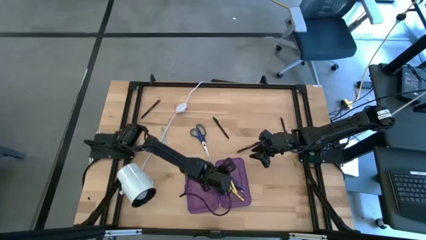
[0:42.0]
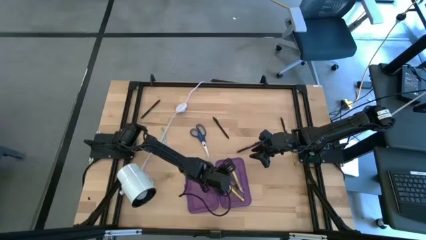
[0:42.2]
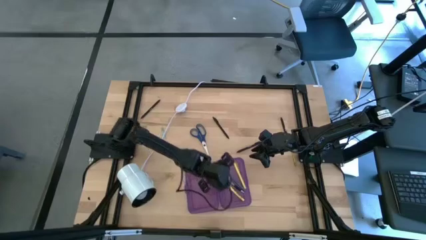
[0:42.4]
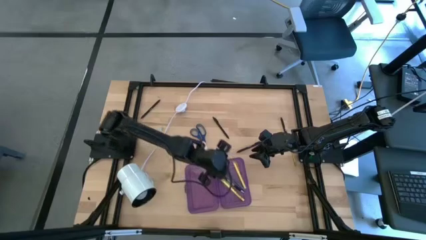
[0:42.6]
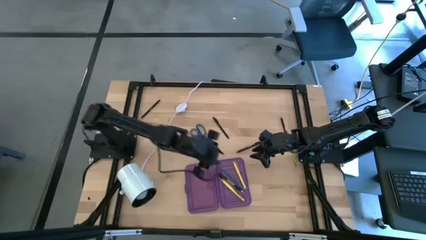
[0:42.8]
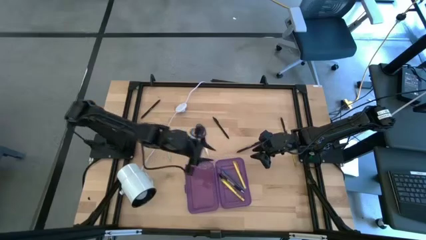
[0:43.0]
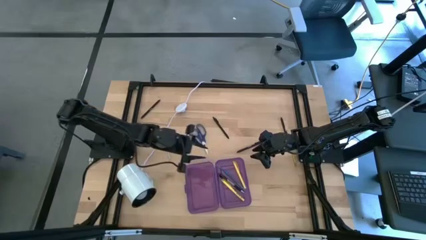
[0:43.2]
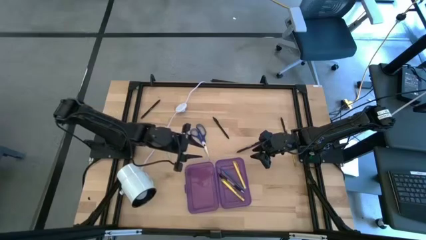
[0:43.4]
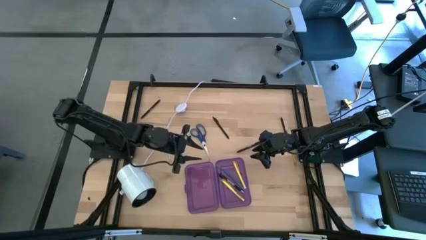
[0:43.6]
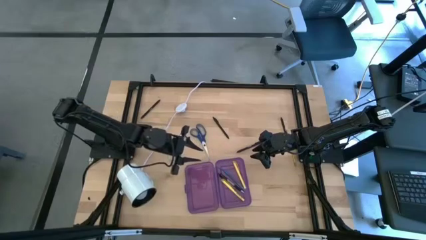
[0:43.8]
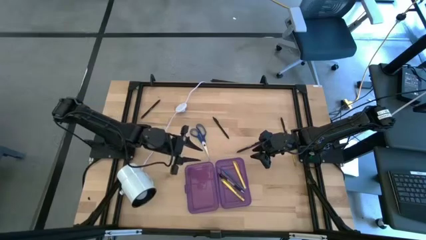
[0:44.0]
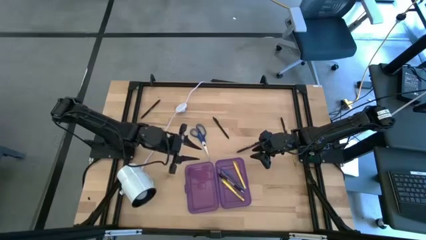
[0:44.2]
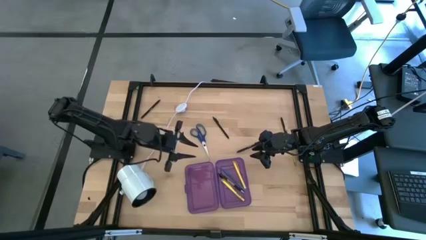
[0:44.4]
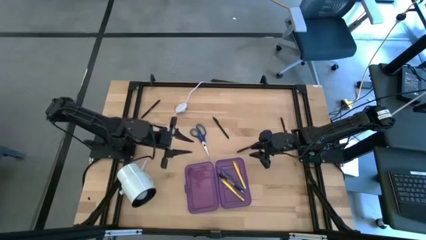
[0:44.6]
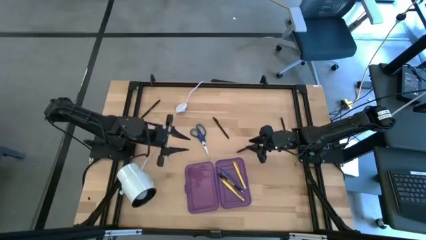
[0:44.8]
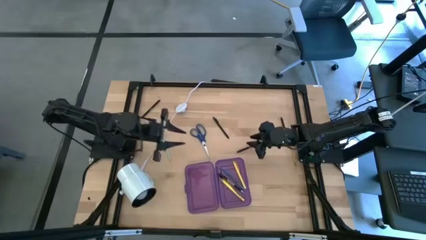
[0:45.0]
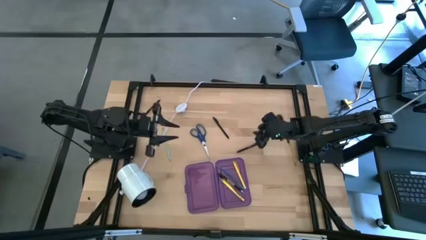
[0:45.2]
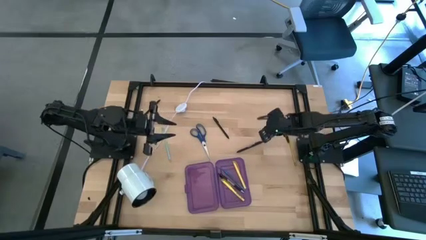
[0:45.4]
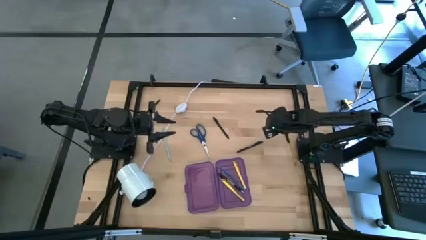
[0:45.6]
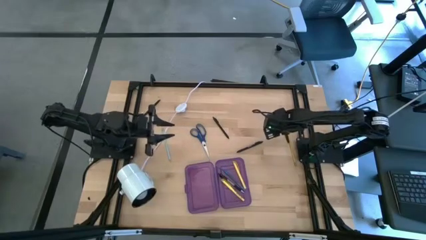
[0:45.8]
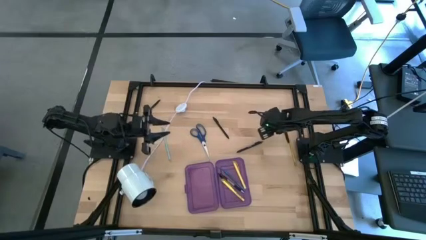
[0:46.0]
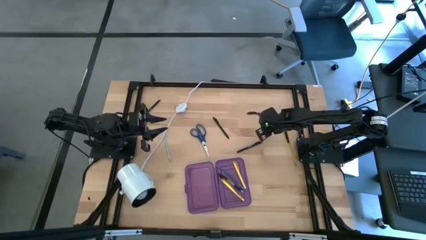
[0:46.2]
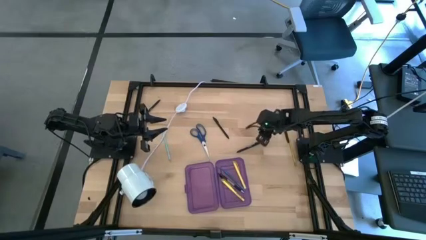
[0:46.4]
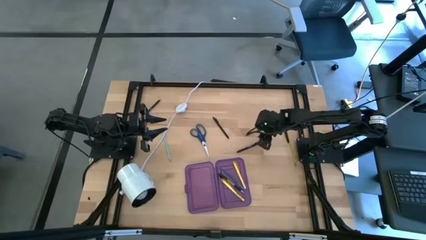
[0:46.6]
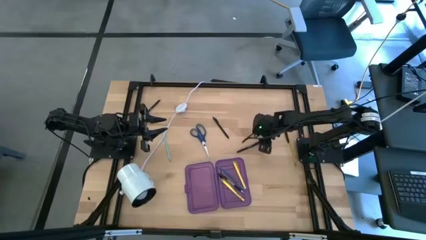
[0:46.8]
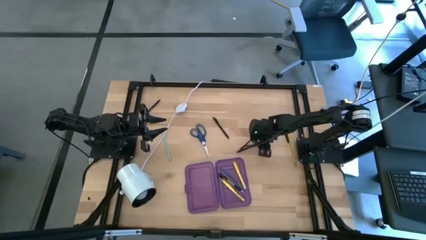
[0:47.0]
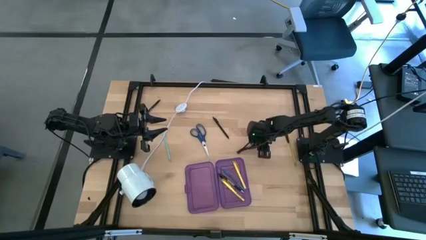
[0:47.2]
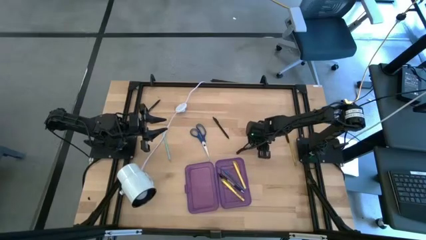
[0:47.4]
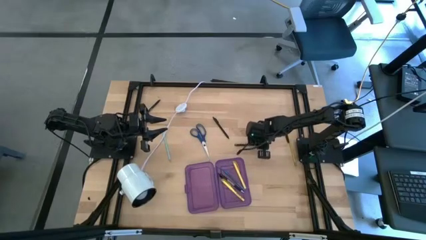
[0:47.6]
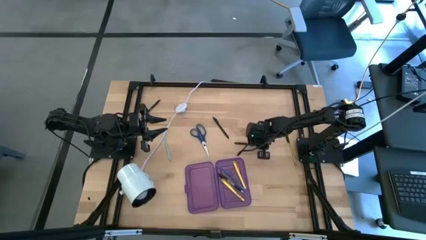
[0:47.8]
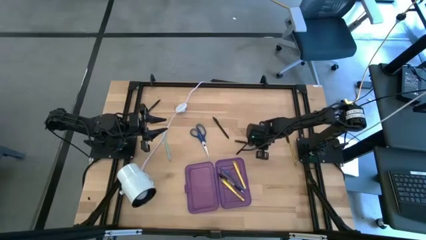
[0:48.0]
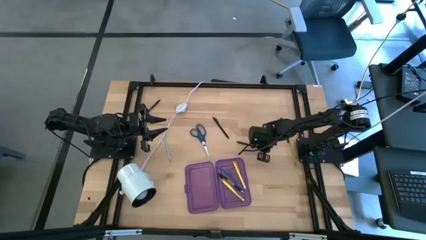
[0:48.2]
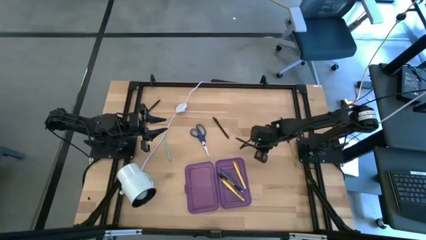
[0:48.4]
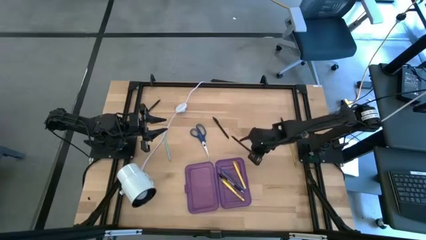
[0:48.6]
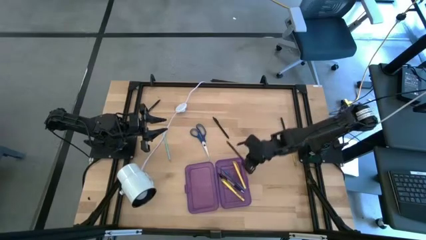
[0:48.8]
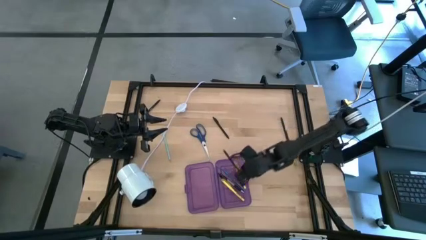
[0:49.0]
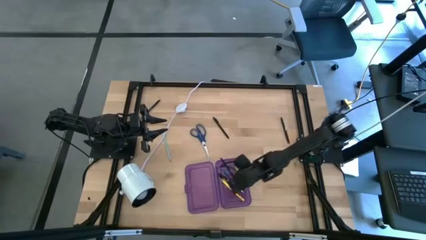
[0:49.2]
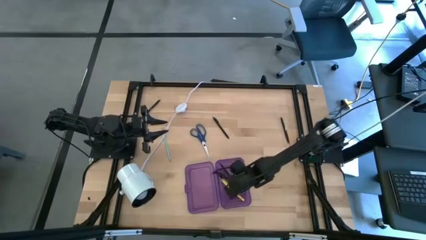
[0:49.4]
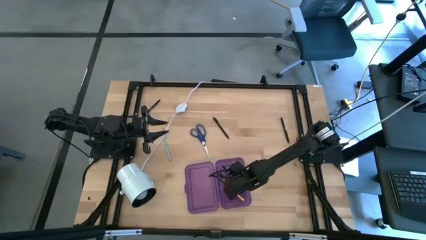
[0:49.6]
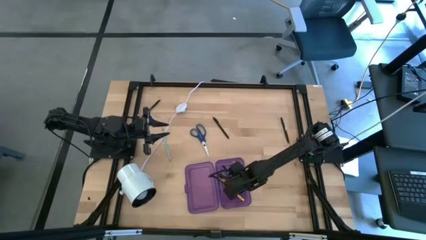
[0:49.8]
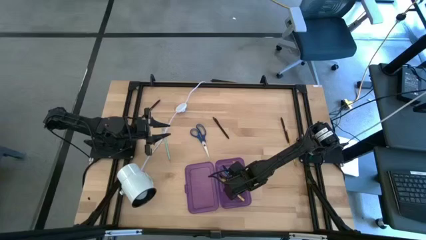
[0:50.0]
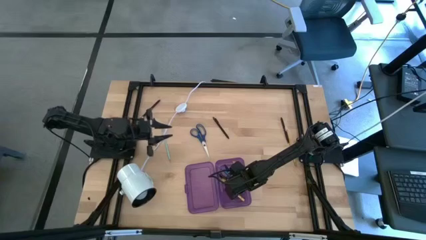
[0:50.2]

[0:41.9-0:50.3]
Task: Pick & place school supplies into a supply box
Put the black pen into the purple supply box

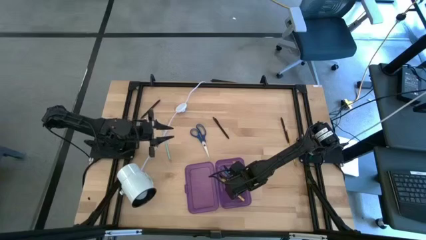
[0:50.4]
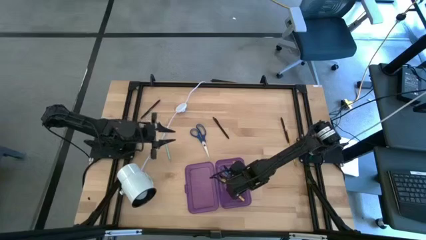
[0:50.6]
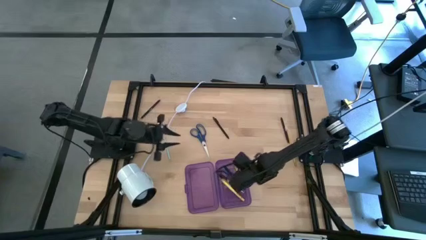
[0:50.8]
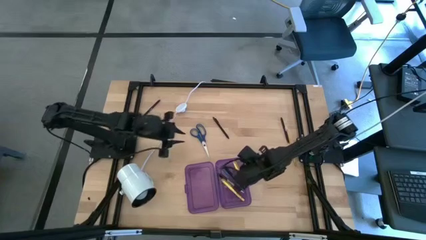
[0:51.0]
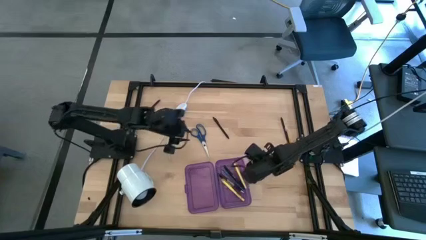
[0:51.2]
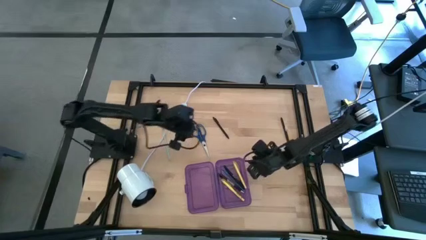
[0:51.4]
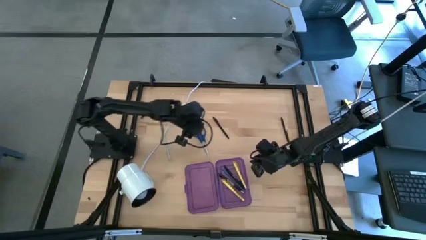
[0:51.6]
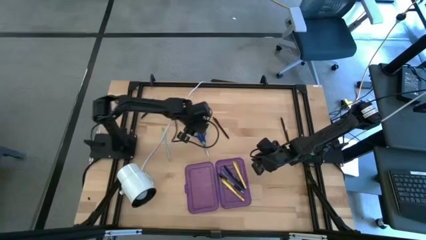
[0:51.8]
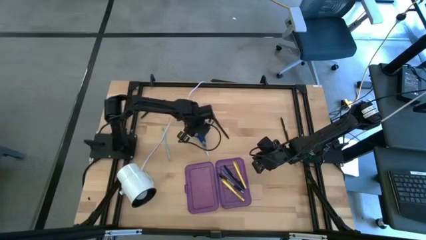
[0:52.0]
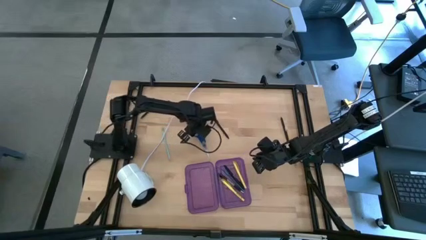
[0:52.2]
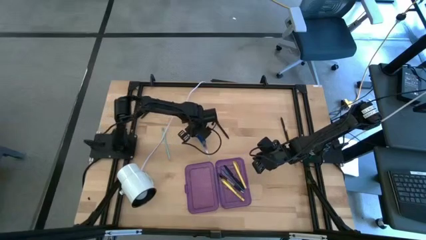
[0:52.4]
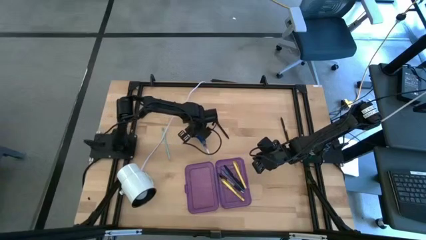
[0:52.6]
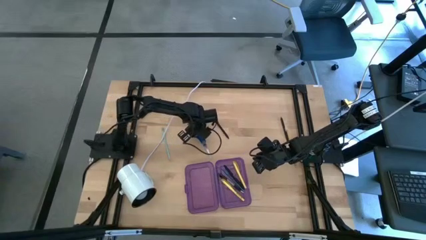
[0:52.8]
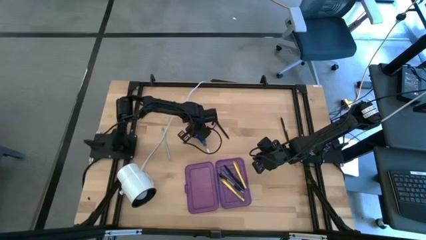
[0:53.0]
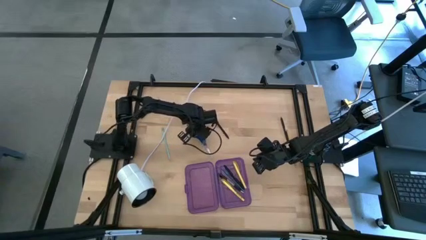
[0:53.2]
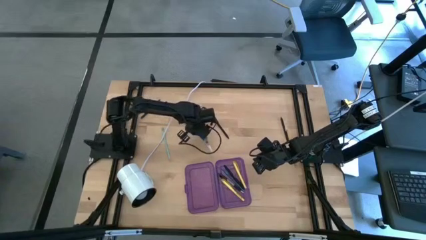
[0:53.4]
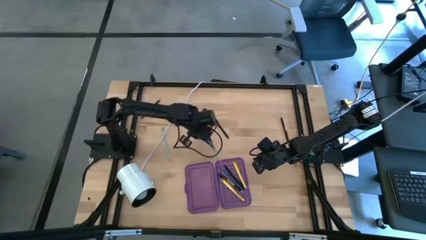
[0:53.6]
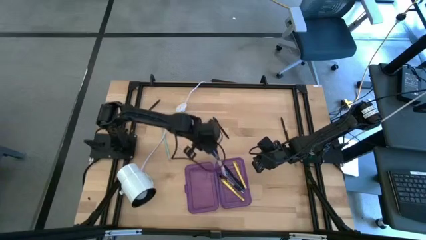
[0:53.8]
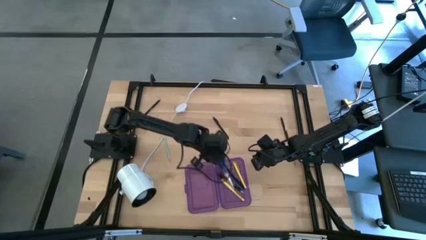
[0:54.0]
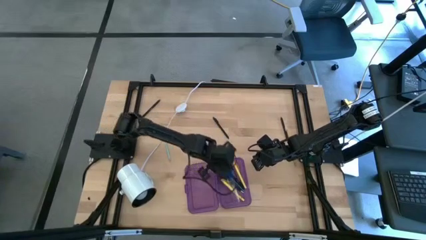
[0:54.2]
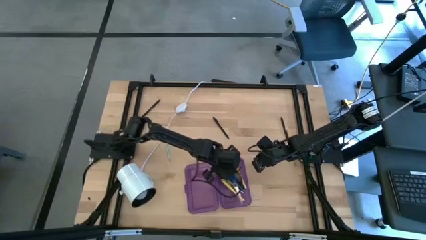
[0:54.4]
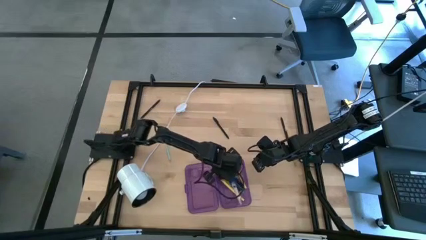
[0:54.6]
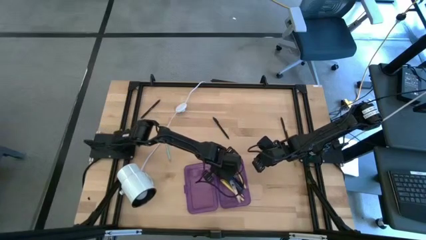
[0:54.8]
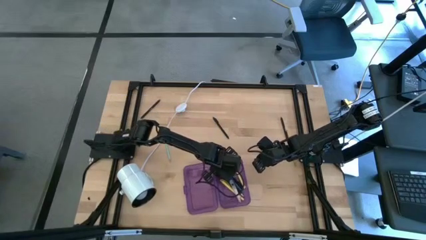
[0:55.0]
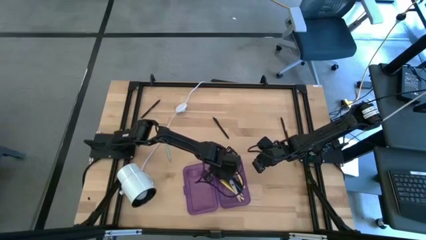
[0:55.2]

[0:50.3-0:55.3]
Put the blue scissors into the purple supply box

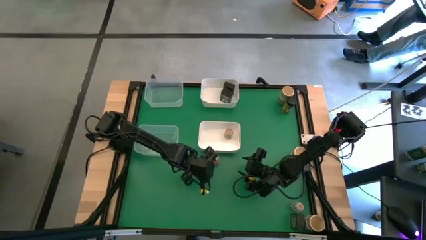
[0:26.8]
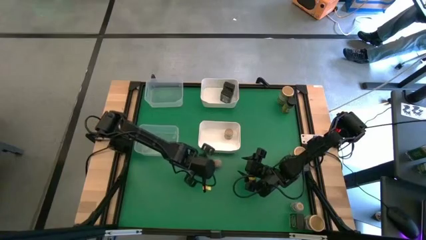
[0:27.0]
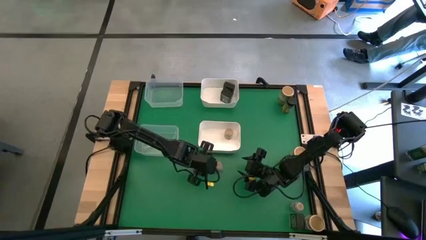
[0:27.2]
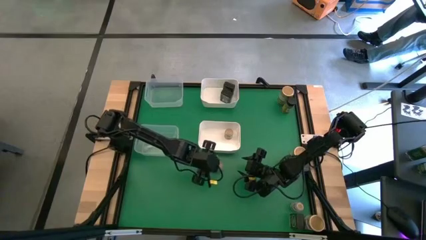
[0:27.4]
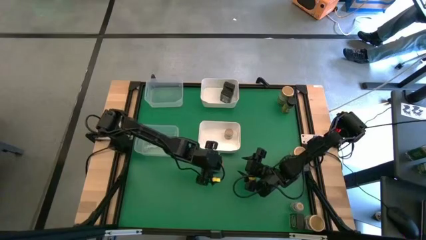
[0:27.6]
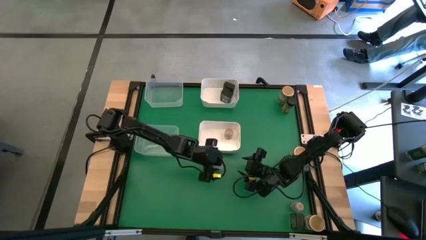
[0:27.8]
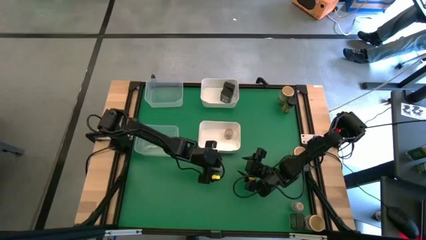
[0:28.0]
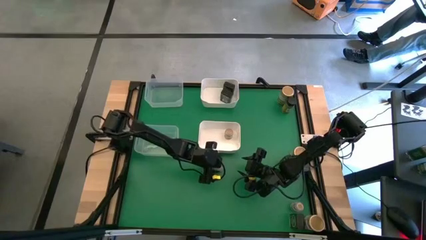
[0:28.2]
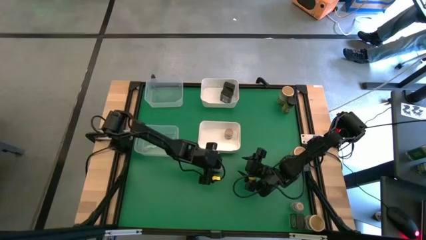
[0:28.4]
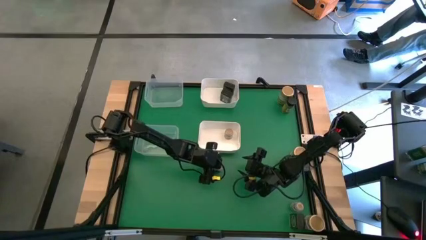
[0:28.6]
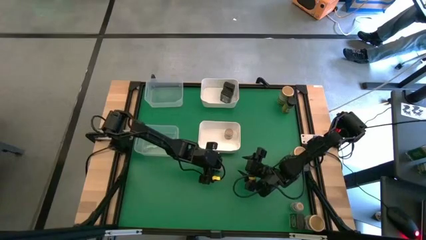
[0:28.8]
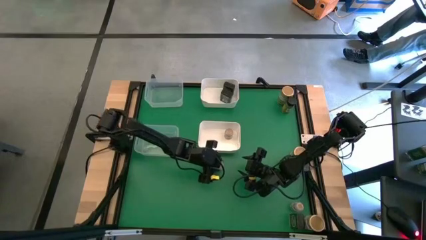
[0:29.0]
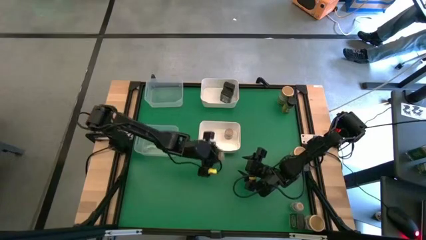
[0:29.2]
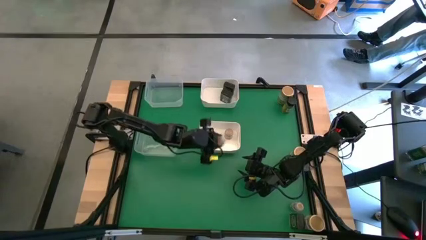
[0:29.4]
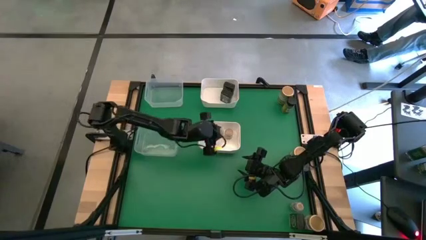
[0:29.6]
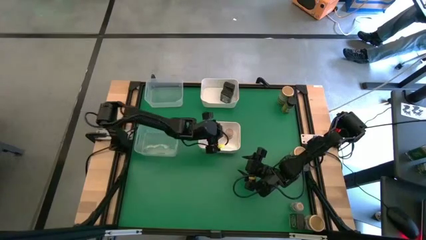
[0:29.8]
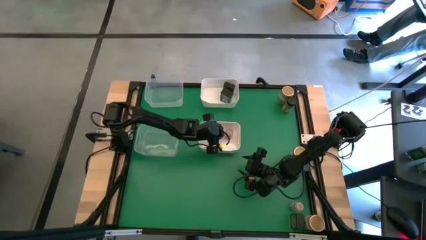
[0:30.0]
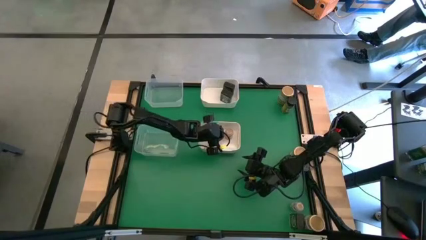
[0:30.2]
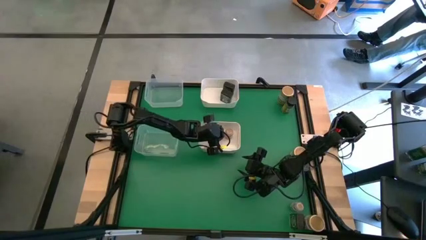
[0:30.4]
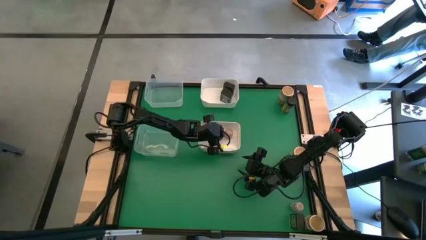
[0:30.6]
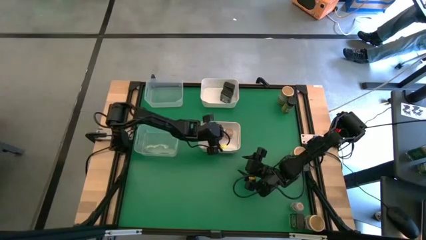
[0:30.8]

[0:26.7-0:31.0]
Task: Sort spices by type
Put the top left brown seasoning bottle into the bottom white bin
